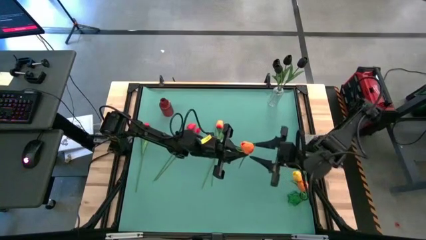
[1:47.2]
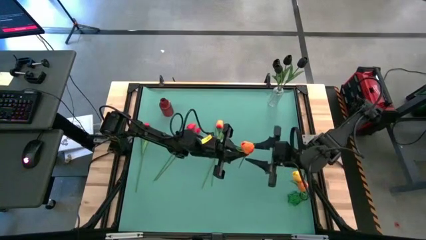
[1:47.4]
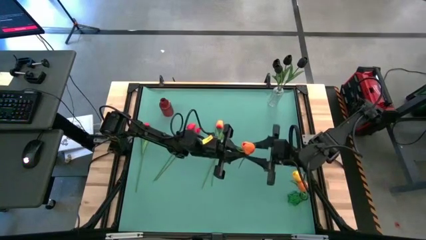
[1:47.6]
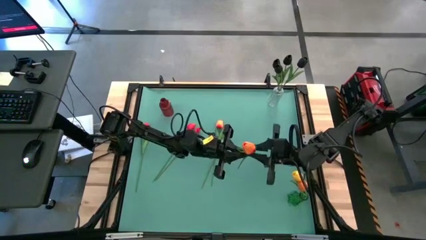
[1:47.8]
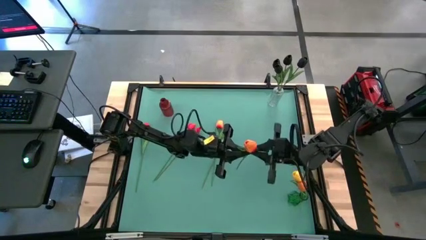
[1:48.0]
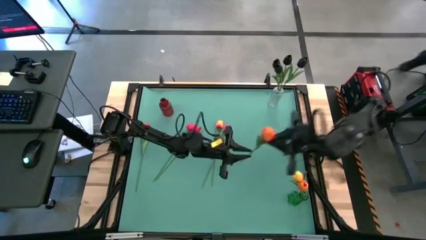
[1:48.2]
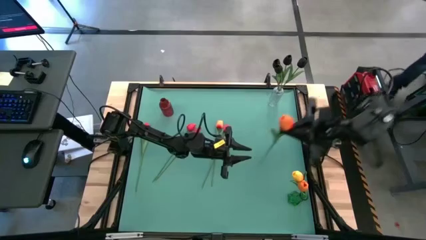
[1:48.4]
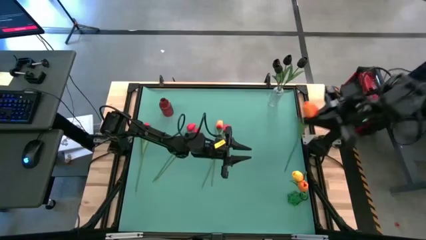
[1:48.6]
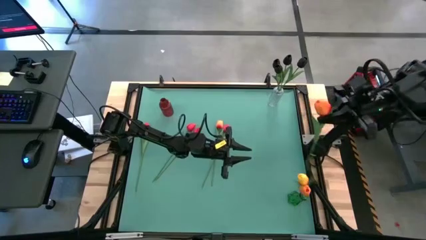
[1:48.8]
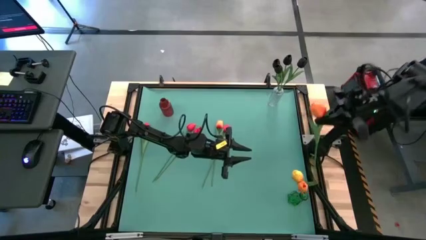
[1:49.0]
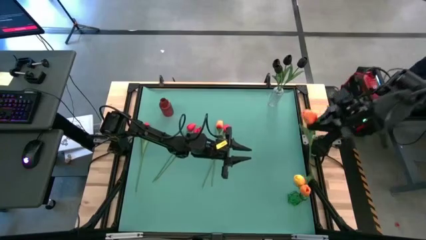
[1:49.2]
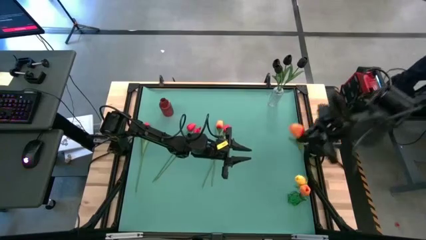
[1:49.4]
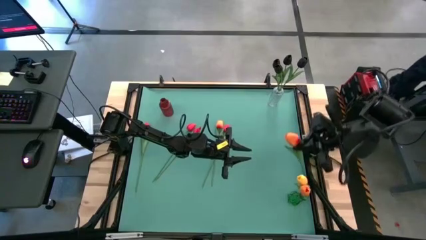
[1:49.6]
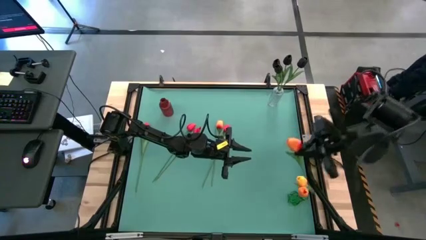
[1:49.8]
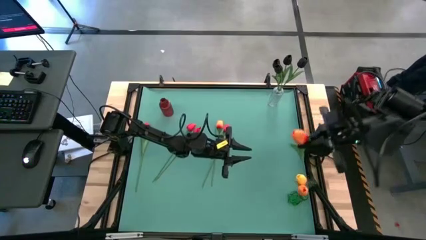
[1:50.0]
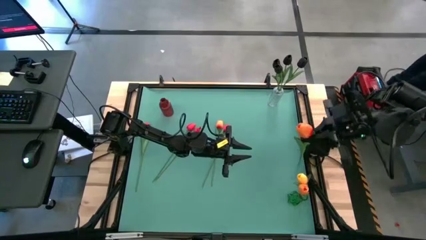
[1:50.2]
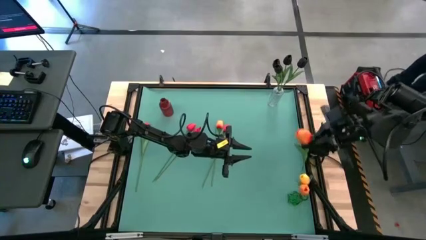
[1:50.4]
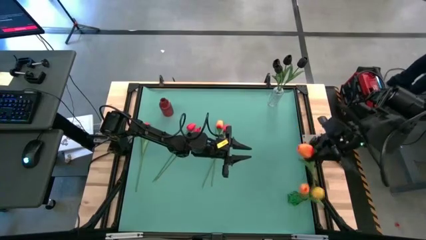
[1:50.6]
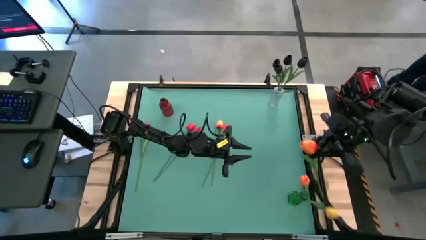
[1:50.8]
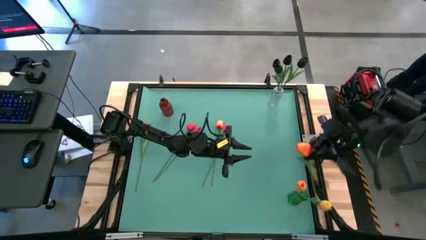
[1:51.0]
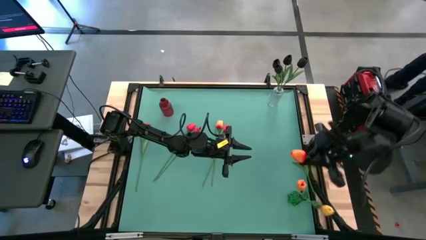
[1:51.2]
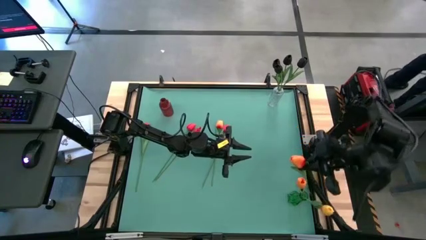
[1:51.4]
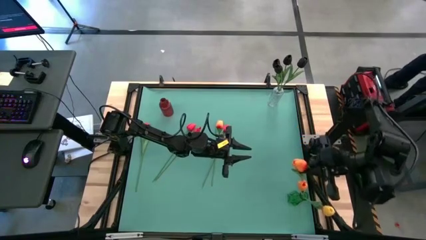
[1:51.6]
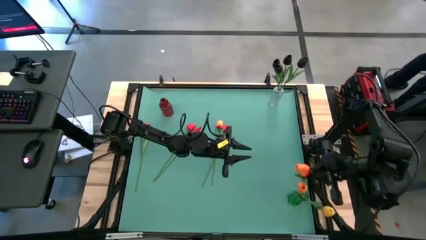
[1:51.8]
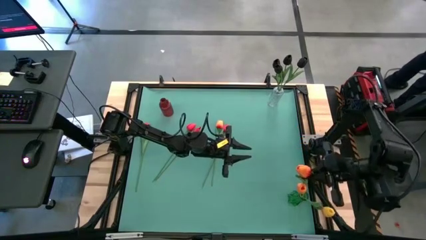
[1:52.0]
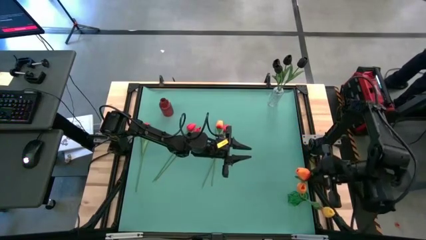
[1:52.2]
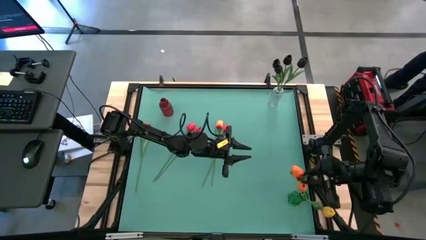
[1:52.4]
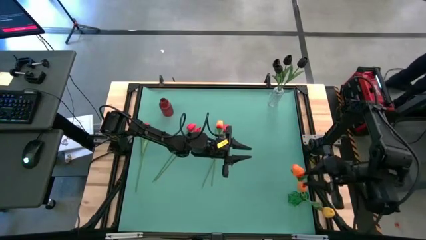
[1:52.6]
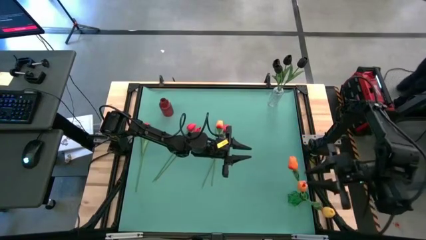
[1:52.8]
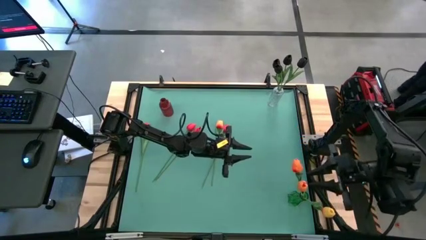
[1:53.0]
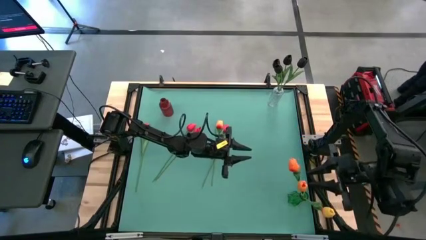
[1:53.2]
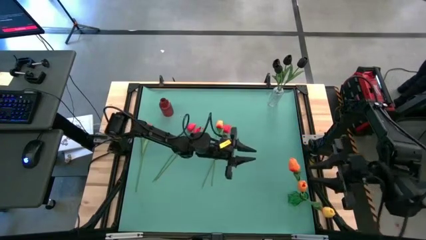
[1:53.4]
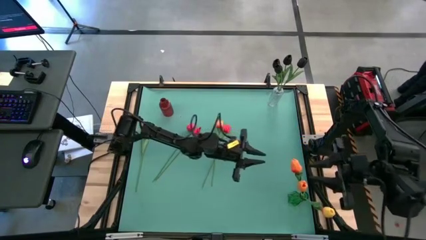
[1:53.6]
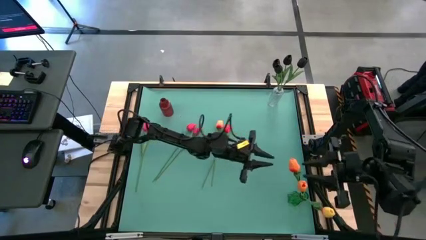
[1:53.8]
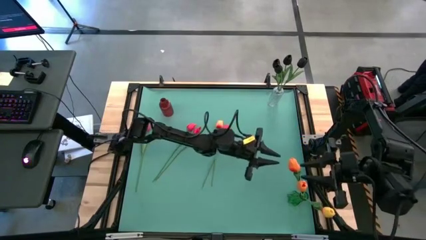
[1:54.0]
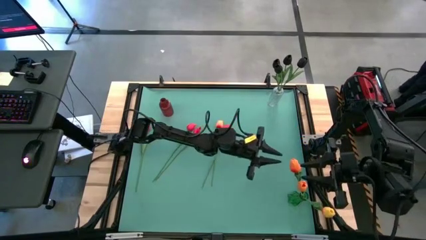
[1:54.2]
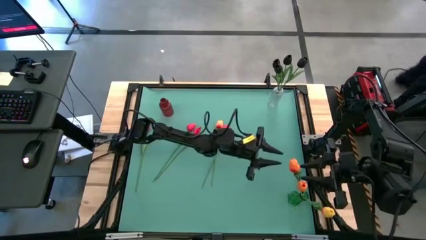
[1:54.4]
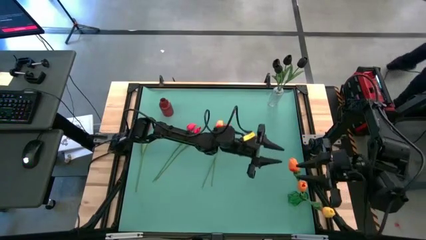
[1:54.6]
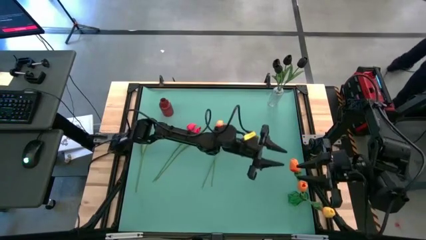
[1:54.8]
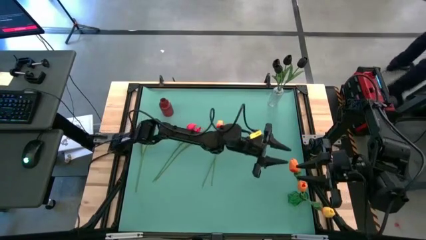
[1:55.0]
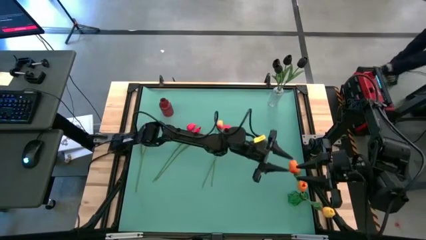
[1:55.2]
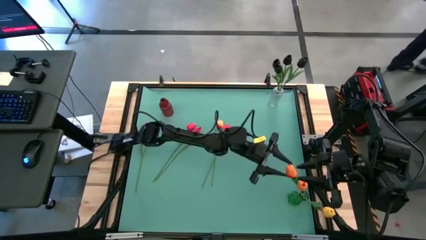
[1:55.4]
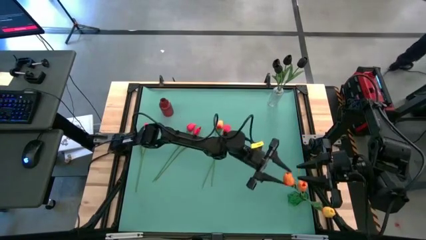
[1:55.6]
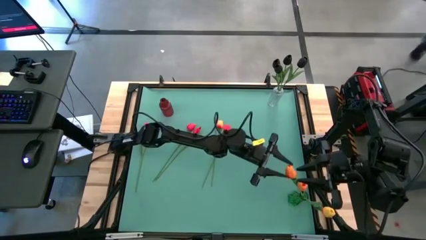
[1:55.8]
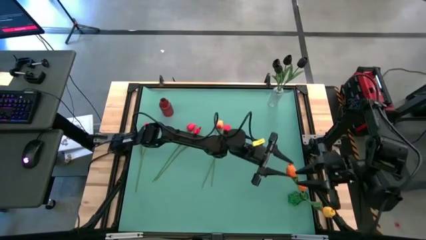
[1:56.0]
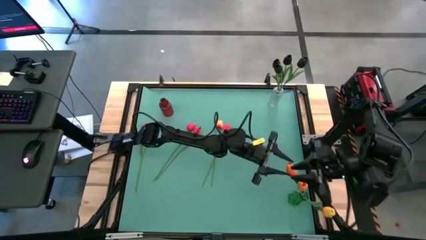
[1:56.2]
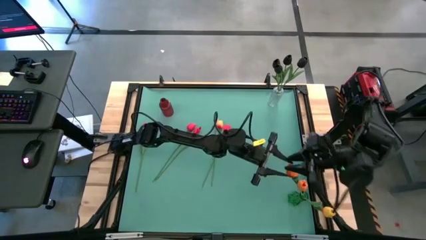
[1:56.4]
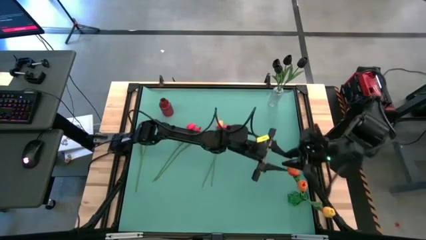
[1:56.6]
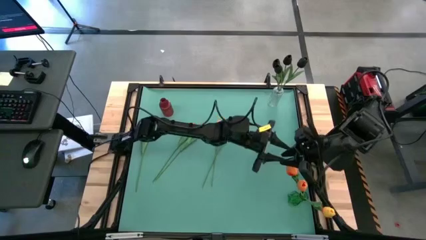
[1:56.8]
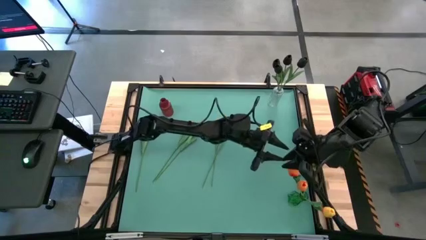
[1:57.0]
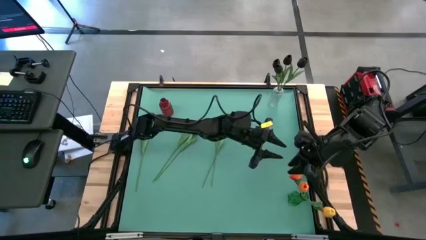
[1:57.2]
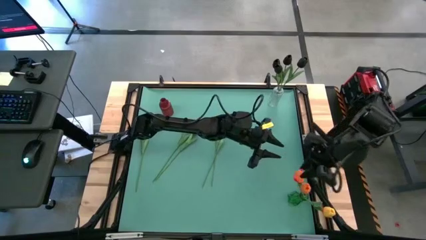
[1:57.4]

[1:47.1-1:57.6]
Task: Sort flowers into vase by color
Put the orange tulip into the green vase

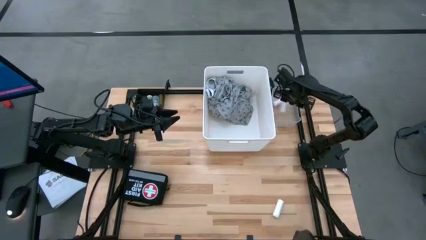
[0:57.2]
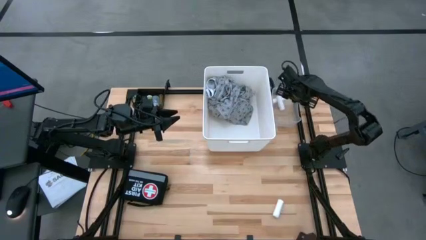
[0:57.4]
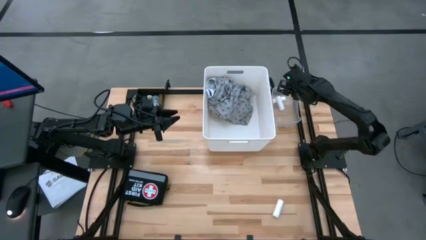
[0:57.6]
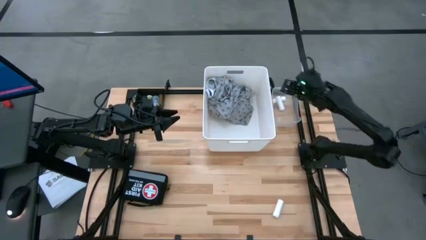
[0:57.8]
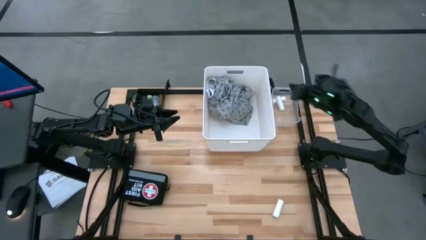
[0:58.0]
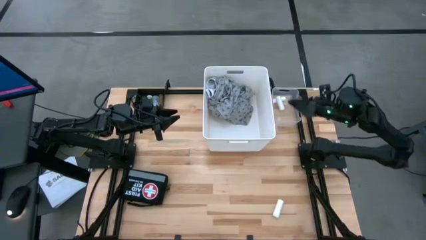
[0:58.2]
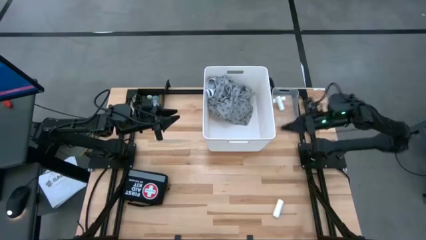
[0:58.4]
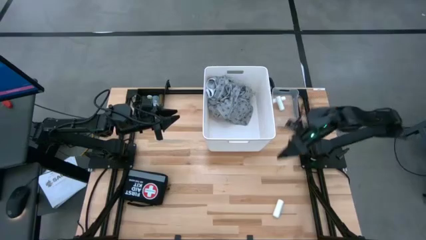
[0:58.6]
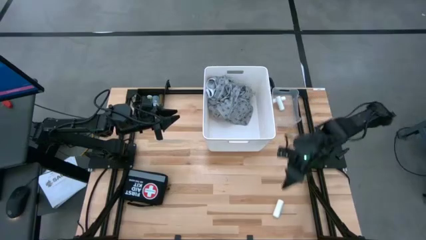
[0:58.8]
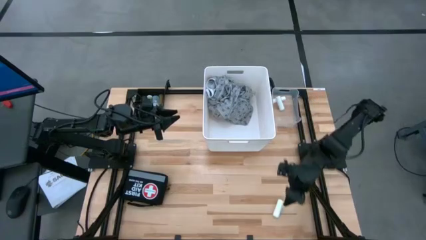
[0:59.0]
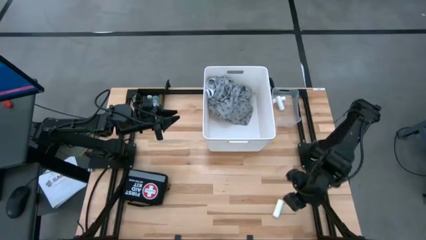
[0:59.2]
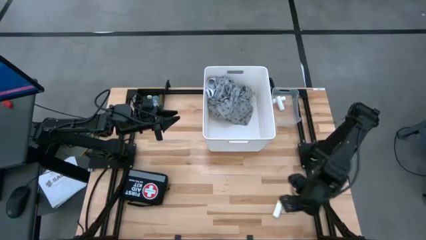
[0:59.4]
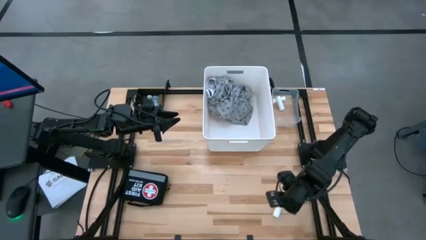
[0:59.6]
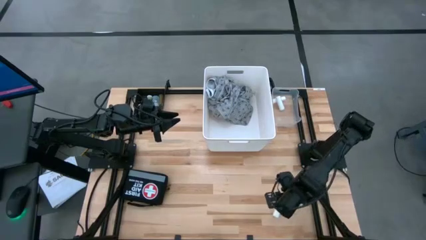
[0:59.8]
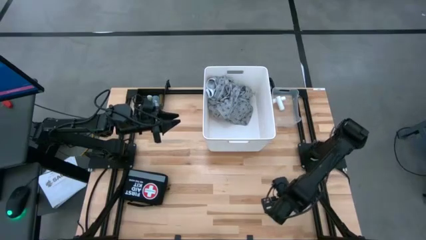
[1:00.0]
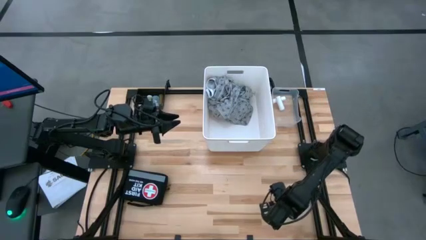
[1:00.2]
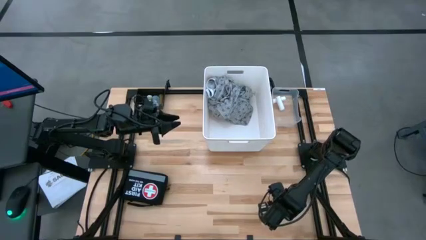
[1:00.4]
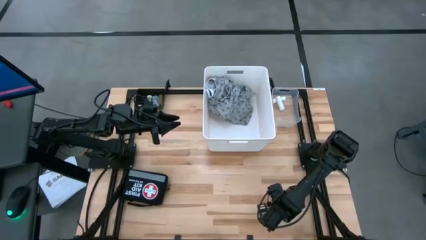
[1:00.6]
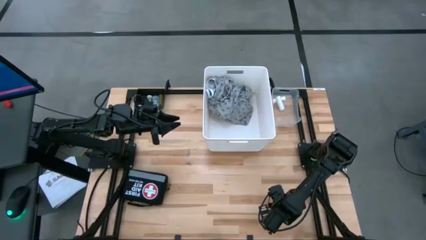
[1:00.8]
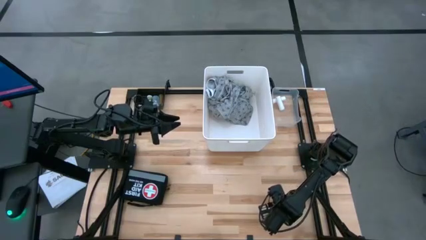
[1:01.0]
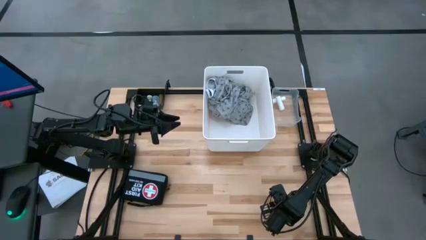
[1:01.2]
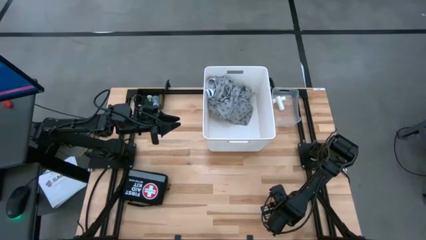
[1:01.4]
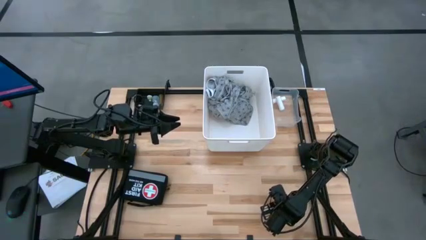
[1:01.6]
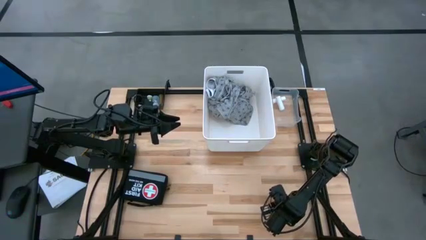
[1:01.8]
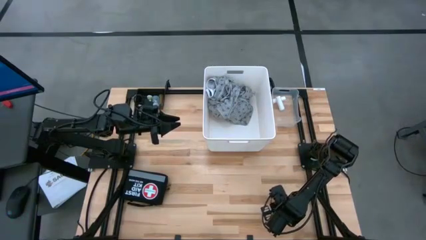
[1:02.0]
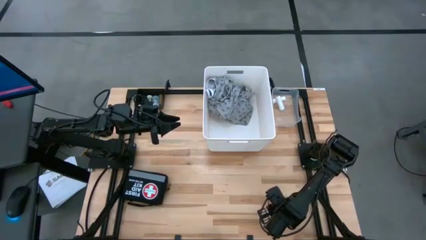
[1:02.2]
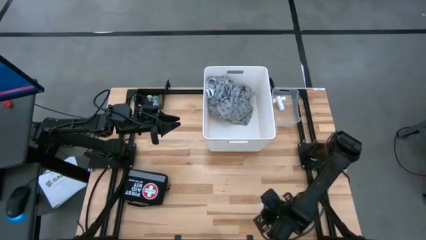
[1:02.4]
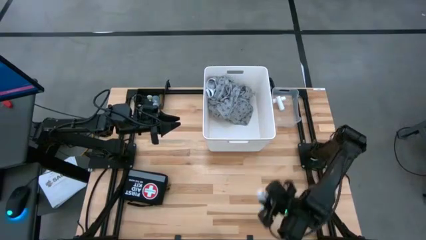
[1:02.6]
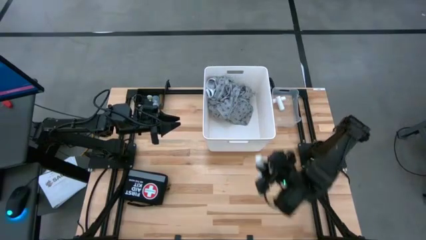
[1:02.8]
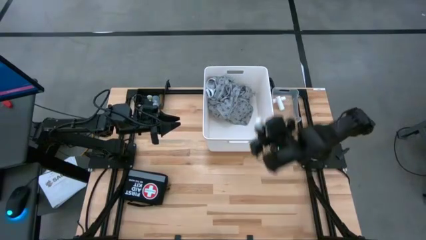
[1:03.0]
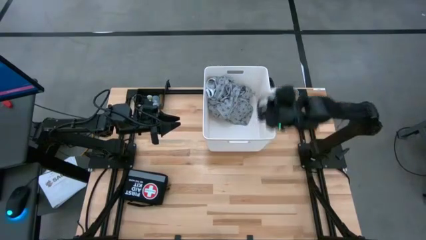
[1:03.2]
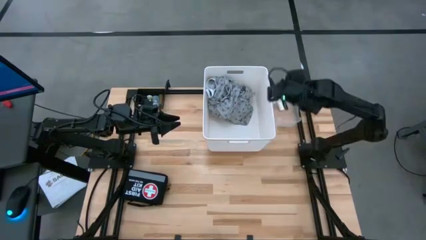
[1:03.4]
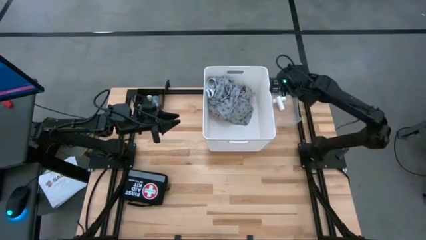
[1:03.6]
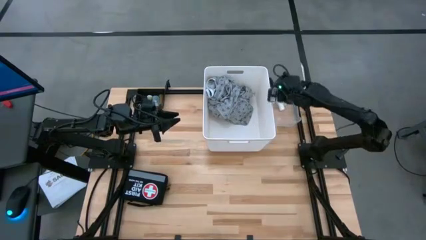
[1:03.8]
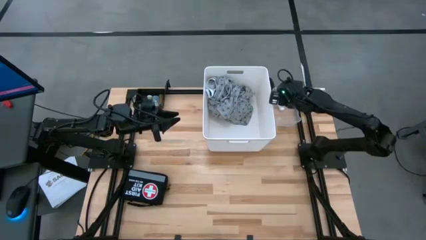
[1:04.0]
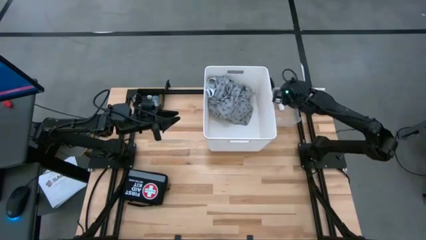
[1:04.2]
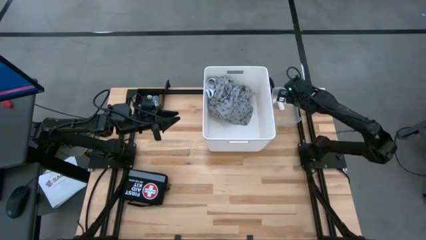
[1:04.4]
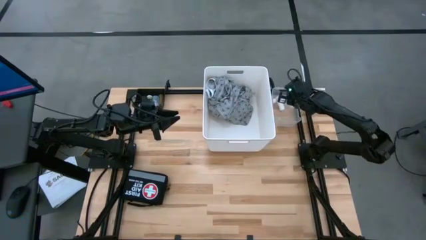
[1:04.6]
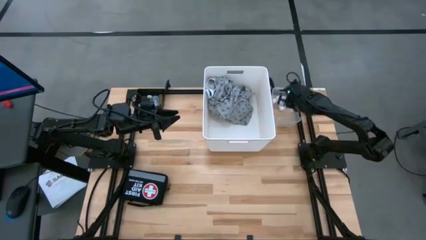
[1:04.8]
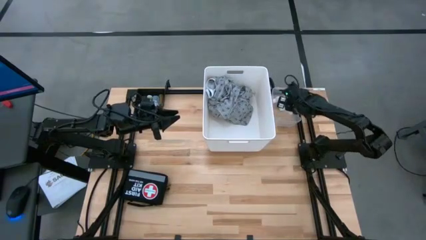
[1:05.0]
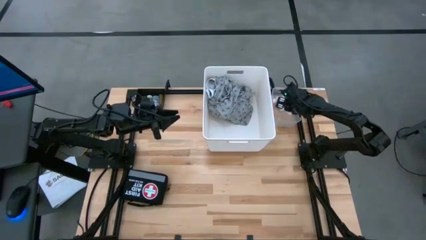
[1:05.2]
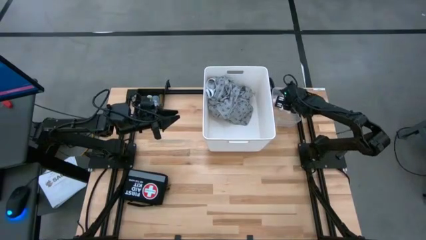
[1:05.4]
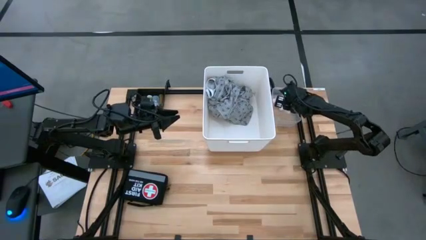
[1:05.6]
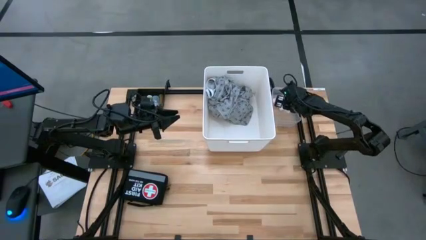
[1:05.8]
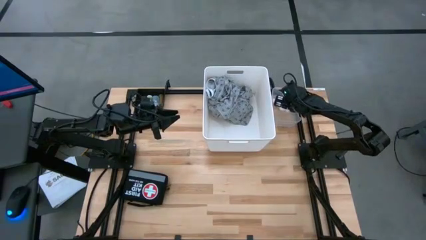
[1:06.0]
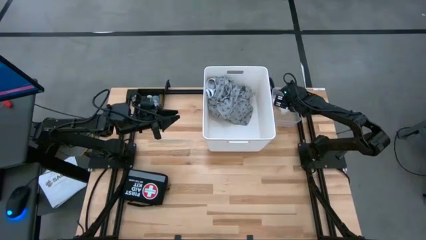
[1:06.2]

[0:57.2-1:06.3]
Task: Pick & place medical supplies in basket/bin
Put the white gauze in the transparent bin
